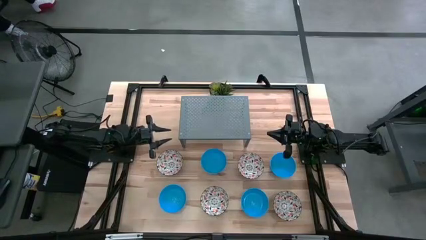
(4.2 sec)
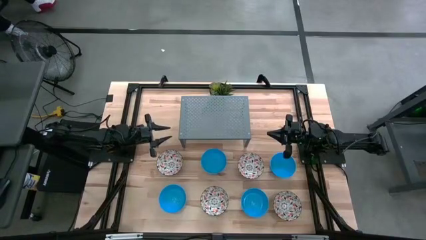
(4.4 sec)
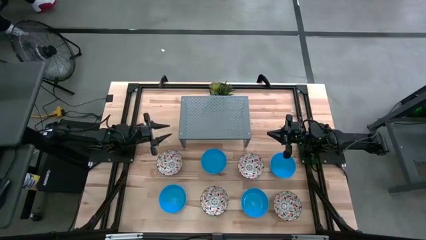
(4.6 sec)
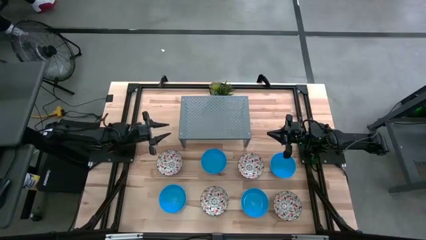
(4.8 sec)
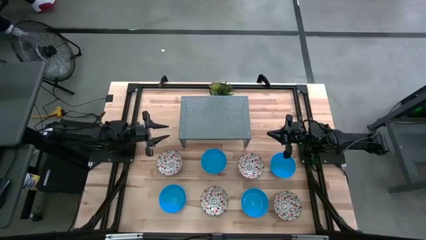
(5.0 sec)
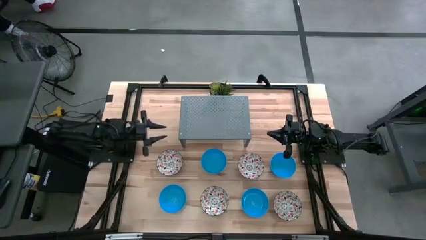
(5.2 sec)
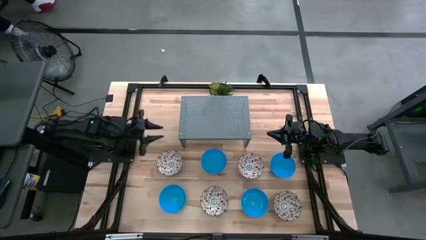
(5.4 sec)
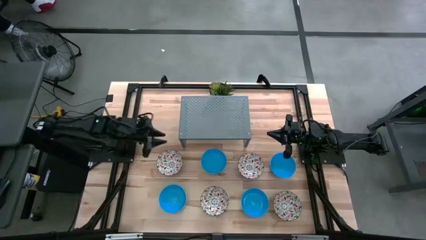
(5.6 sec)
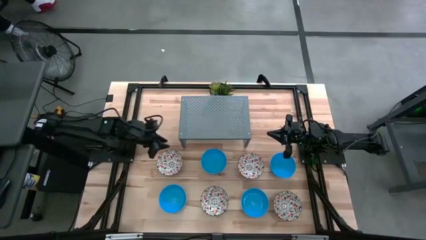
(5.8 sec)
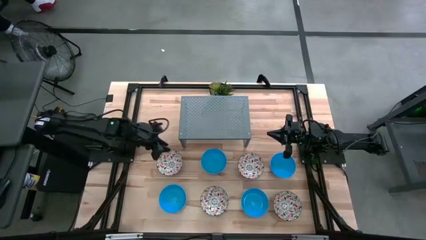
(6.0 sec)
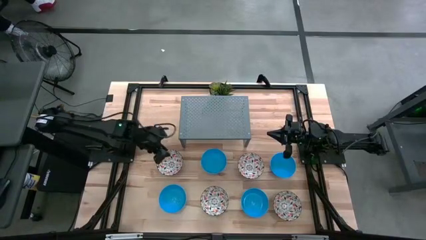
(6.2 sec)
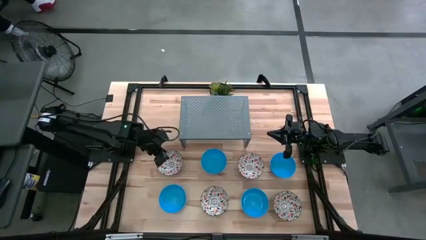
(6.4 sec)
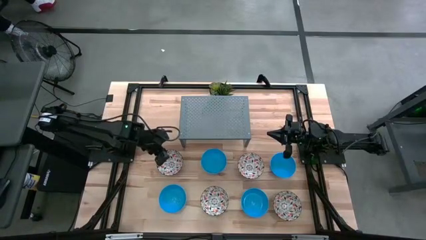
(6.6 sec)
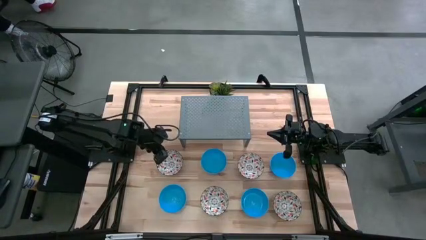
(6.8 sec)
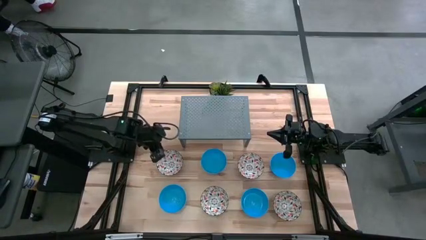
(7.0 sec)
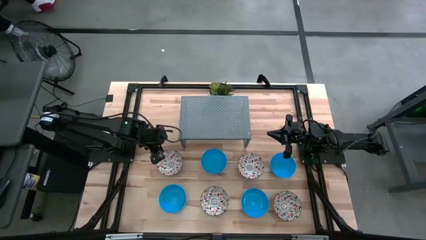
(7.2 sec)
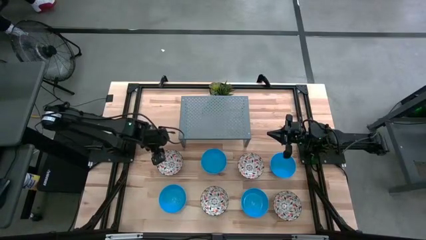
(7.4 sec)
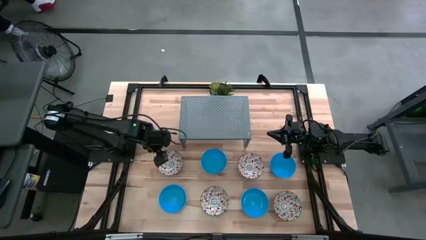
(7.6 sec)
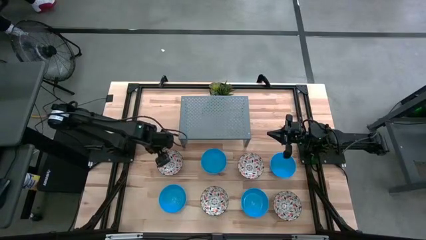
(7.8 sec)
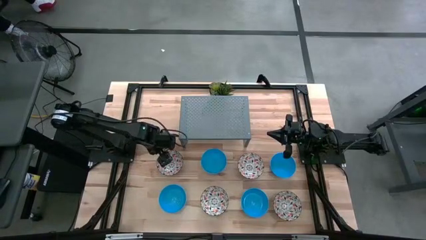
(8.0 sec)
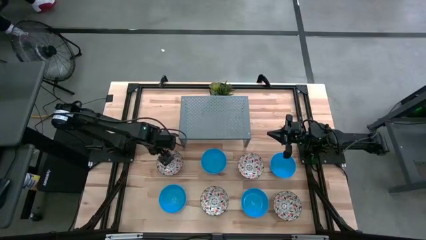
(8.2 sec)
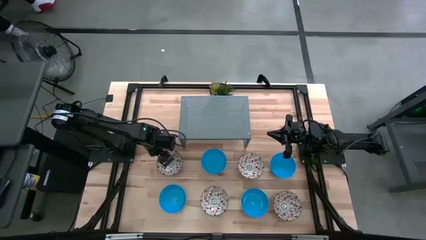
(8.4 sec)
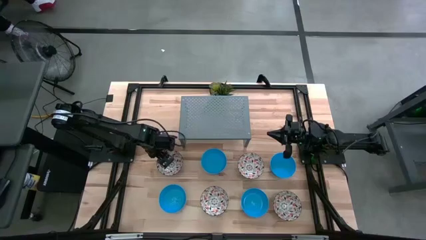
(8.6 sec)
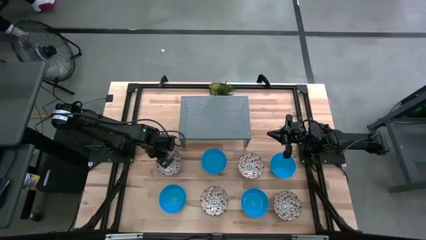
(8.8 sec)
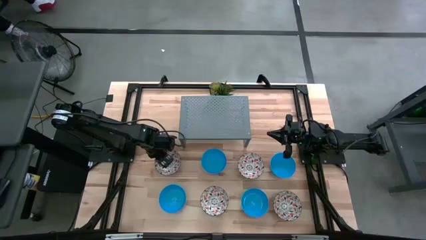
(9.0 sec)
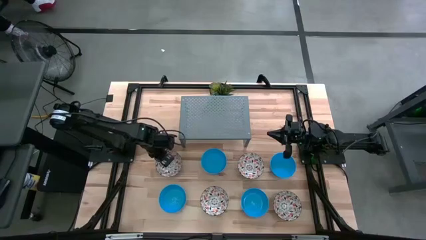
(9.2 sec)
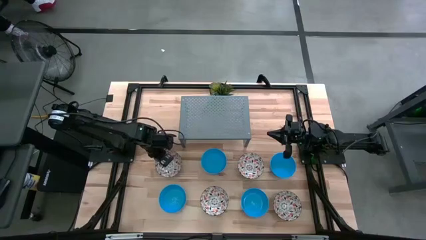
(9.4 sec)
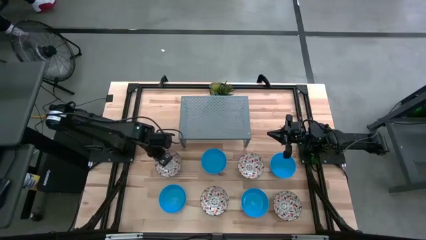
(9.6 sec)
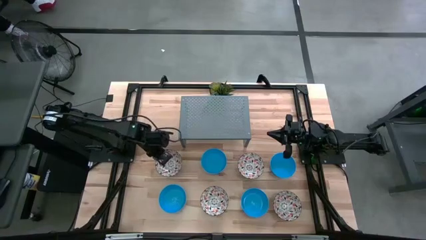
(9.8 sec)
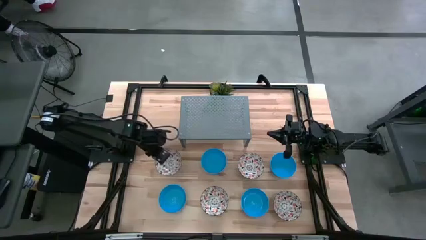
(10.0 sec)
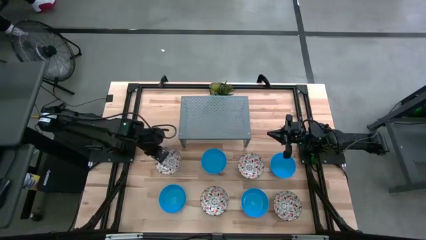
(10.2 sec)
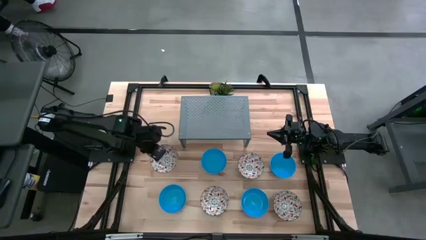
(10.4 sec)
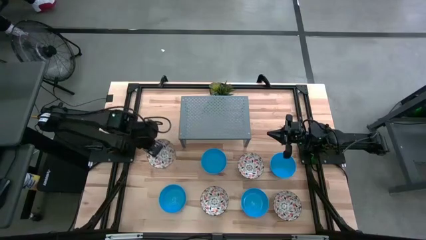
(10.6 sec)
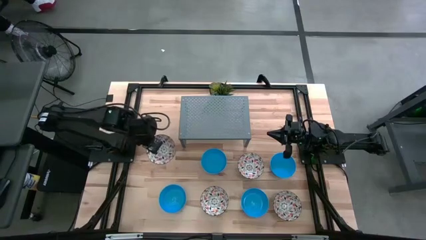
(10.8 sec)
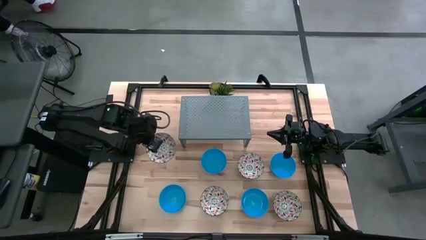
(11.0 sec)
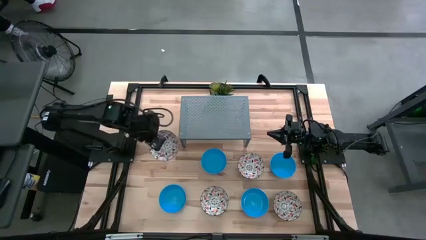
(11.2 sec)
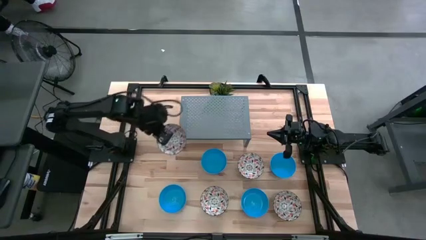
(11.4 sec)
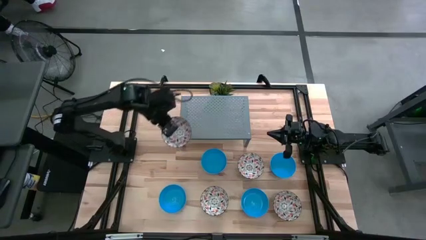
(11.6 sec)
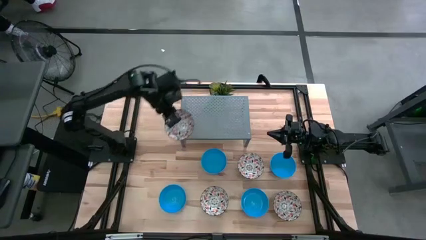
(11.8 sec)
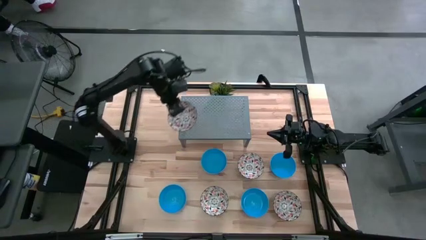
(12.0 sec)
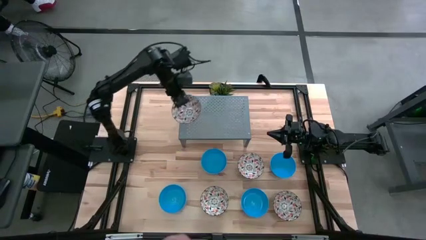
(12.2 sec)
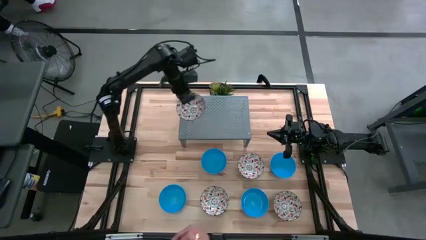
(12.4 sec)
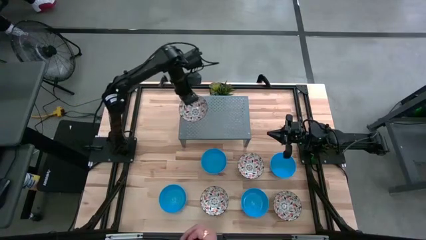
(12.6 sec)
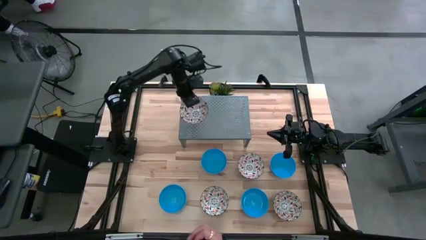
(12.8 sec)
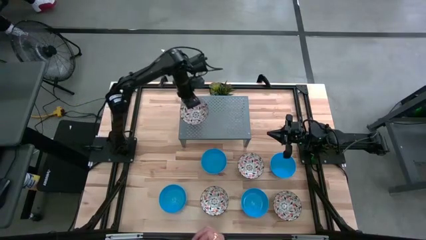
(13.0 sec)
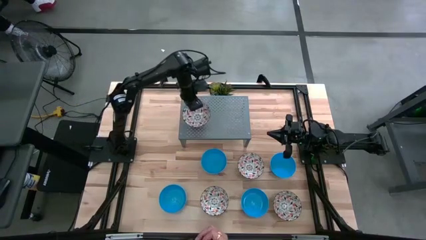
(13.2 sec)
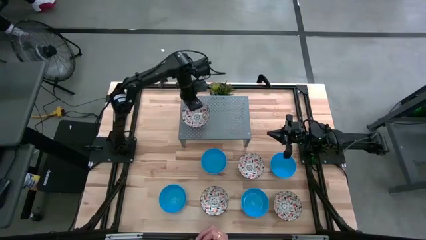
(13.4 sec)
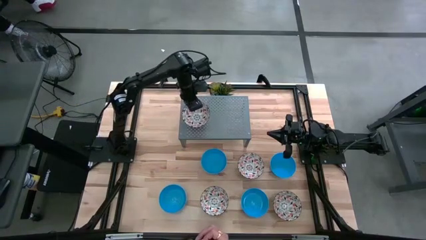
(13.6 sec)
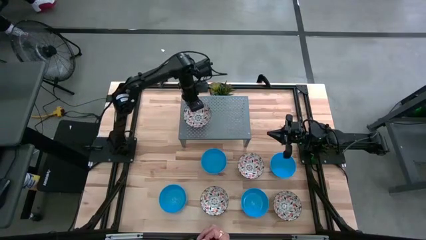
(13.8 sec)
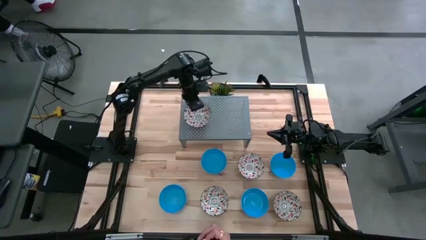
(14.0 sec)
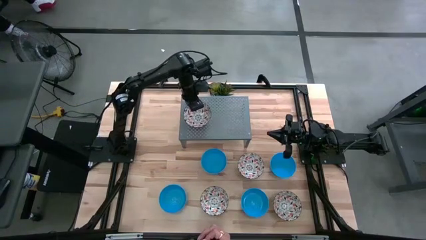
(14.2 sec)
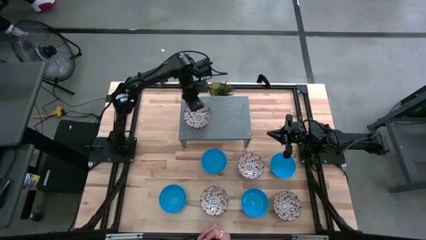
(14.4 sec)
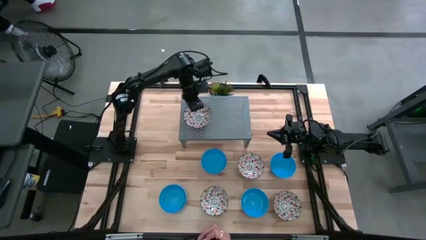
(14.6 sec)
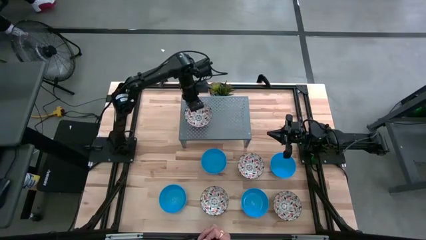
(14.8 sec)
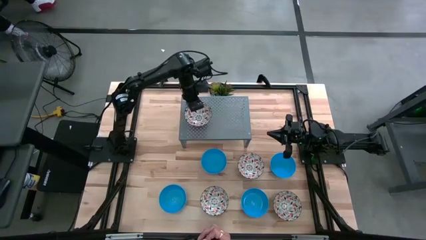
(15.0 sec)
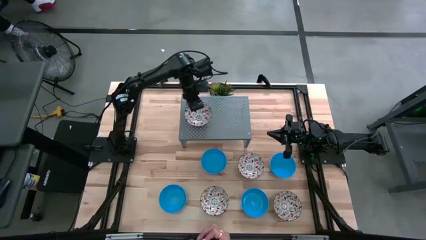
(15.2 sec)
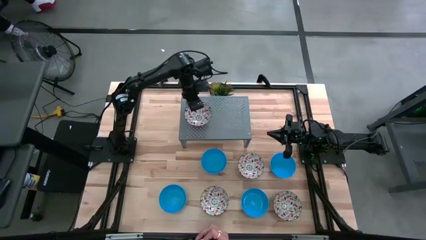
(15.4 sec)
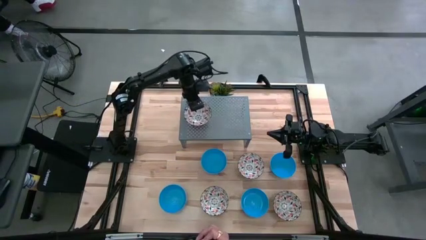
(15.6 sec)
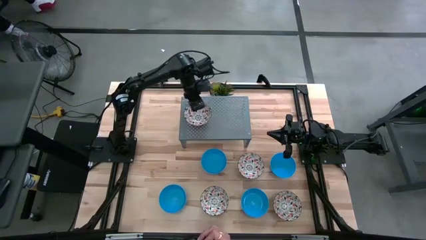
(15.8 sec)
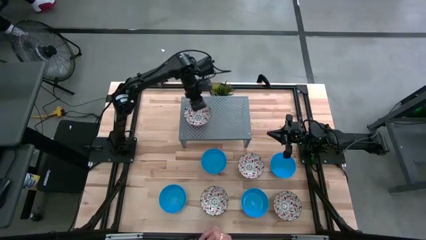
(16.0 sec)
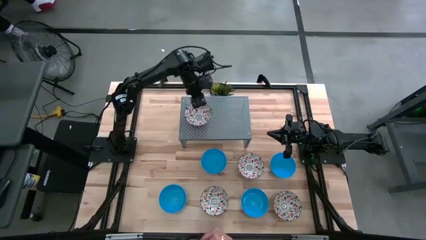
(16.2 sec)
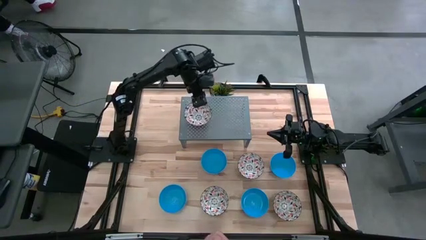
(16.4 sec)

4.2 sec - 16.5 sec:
Task: Pick & Place Mini bowls
Put the white patterned bowl on the shelf
